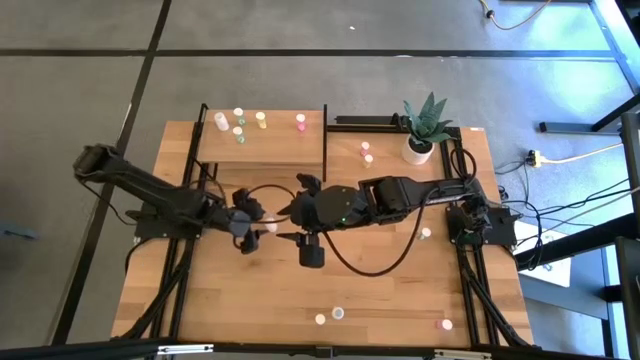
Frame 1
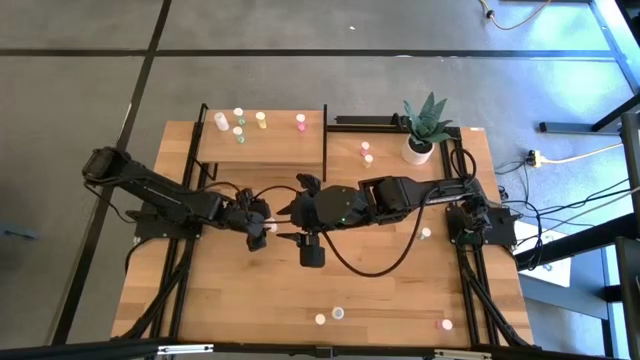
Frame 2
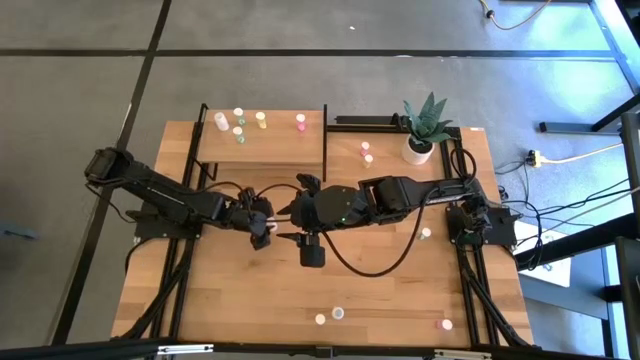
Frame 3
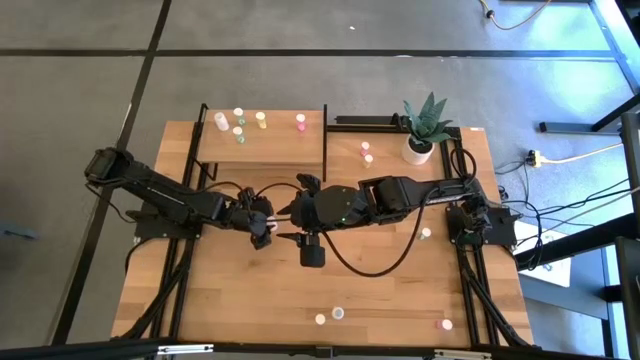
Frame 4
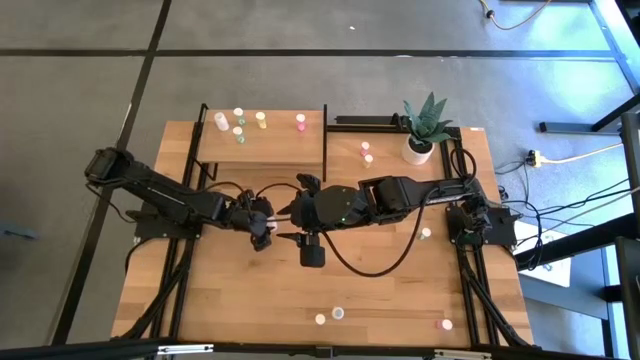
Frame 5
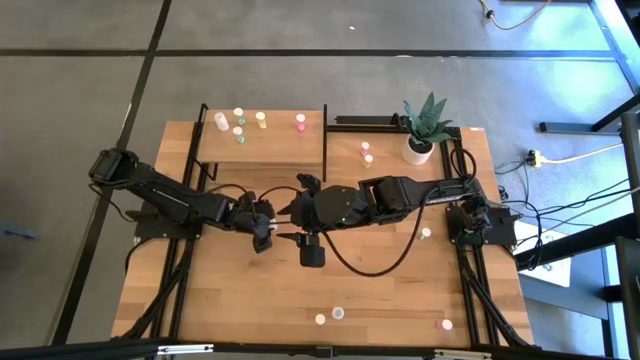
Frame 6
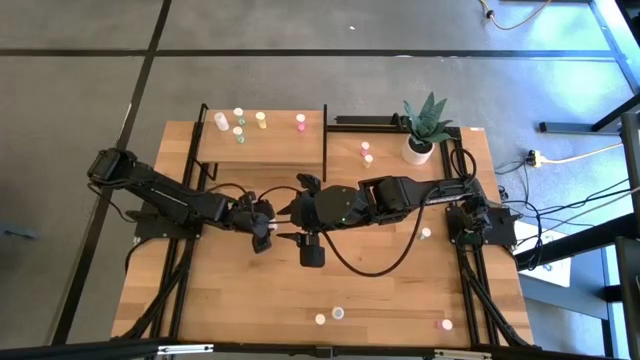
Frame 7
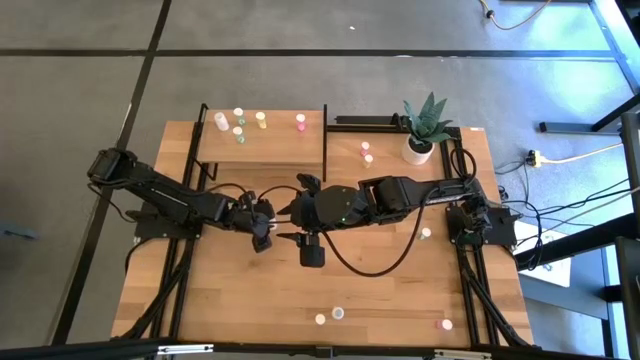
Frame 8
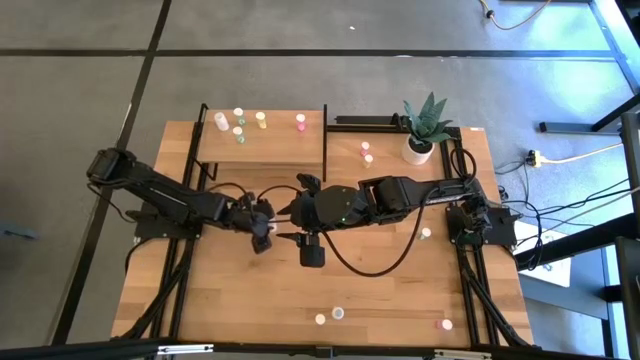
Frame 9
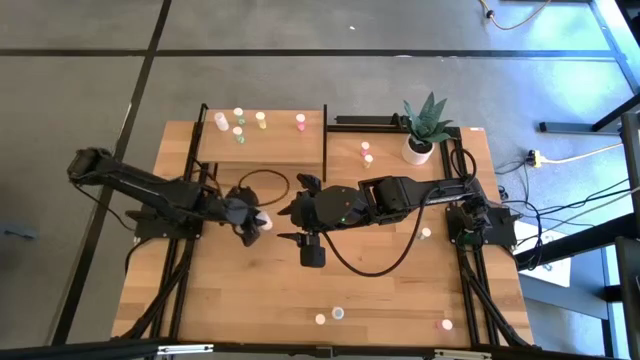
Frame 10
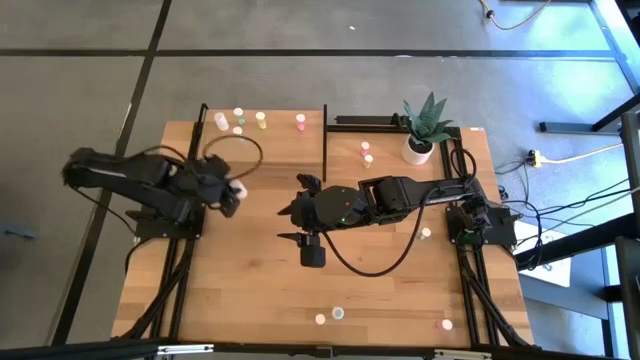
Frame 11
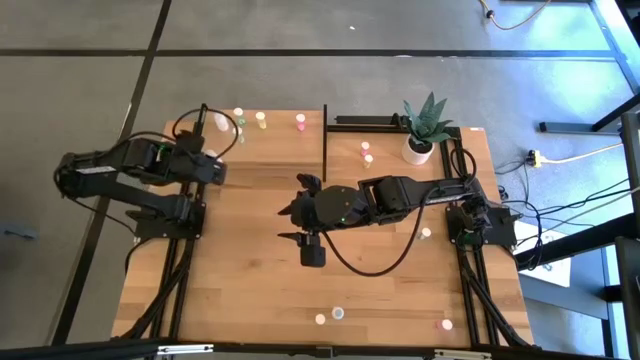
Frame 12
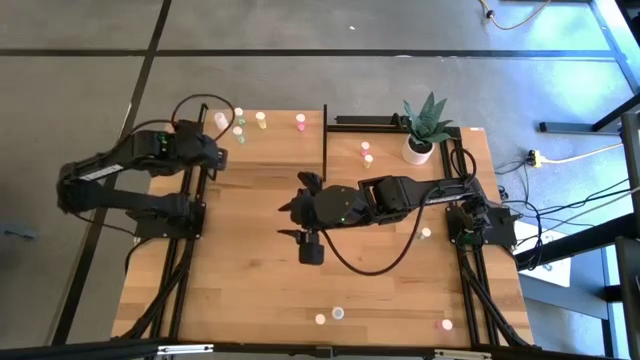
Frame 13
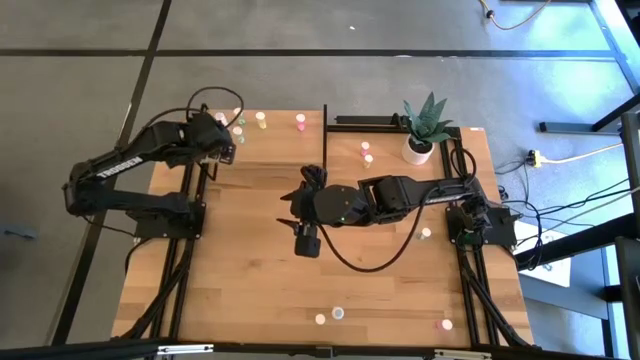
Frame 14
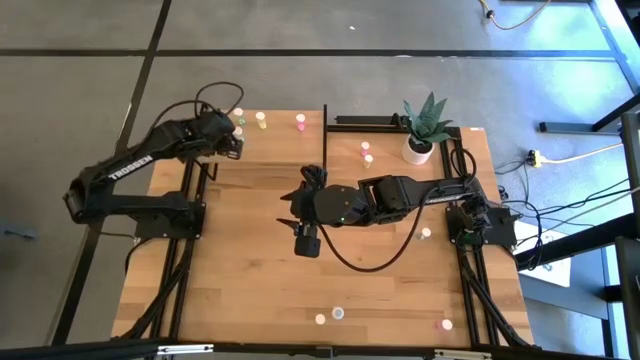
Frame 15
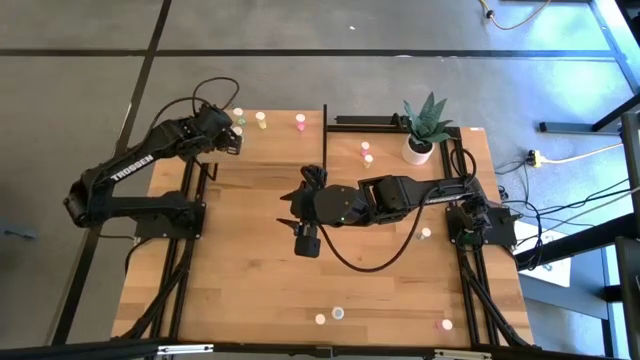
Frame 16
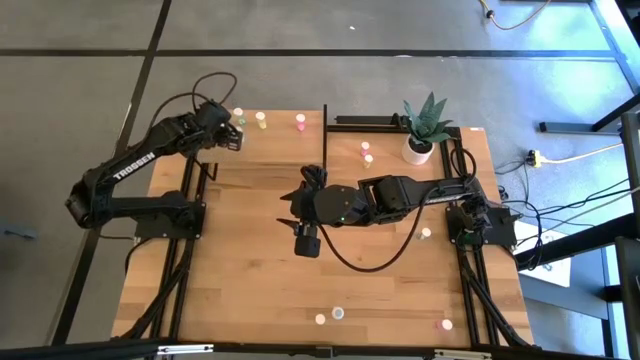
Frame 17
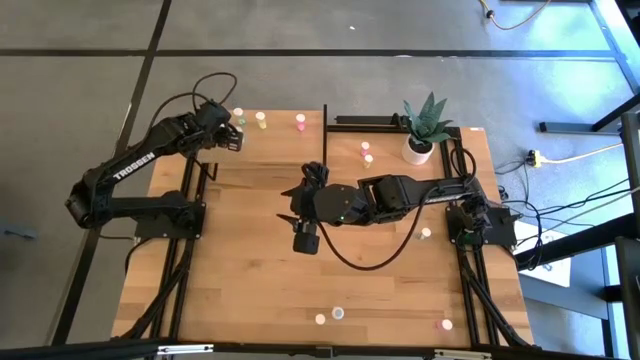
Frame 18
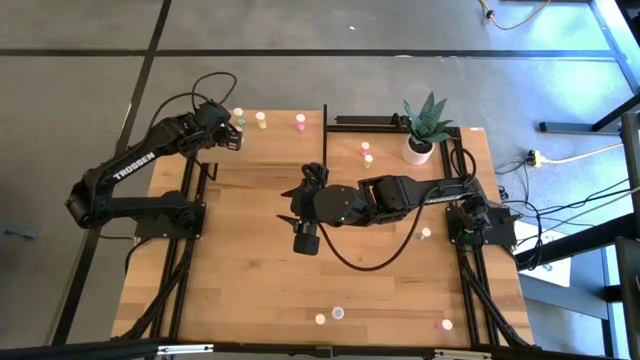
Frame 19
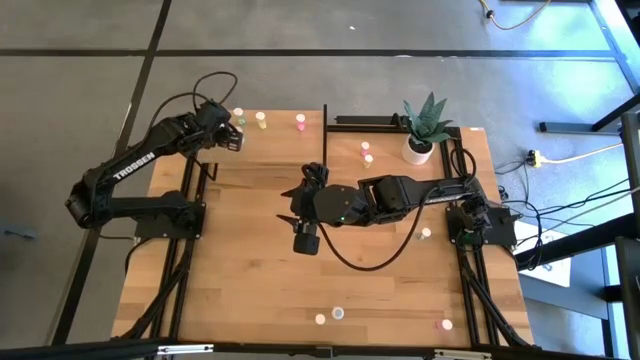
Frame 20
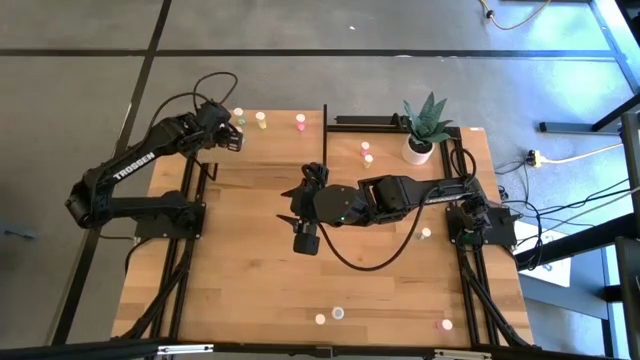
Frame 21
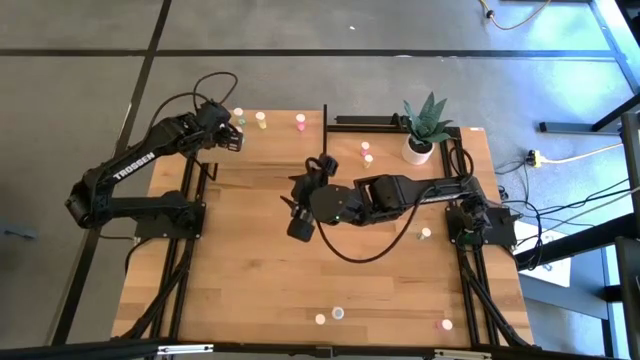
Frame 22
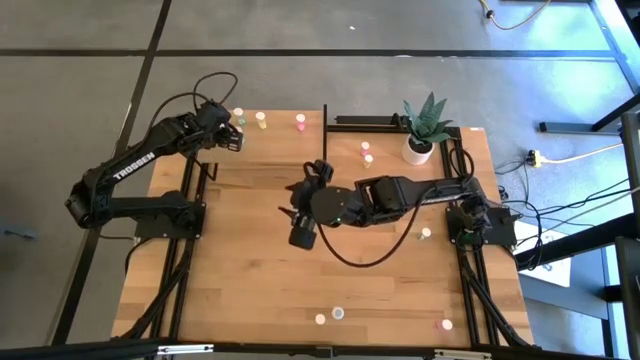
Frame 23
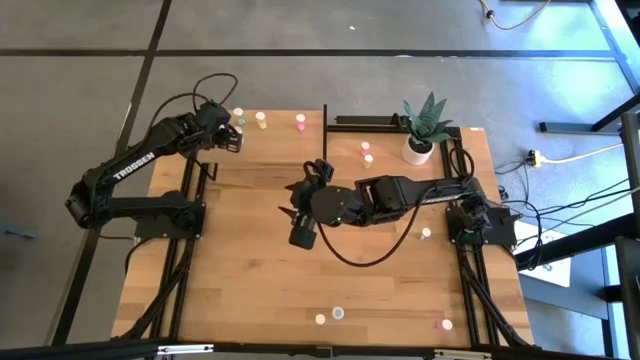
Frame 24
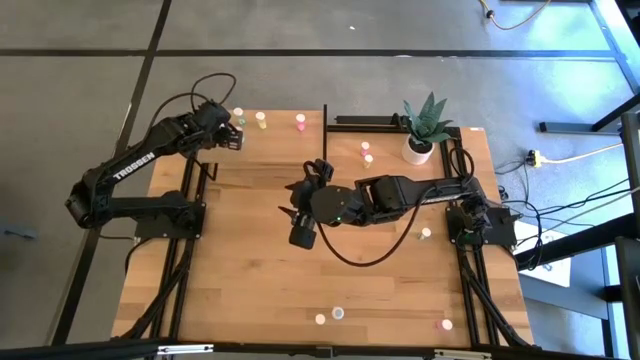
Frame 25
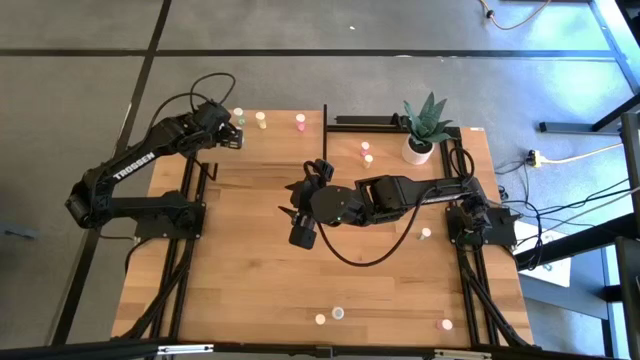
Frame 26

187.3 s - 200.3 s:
Task: Pick and place medicine bottles onto shelf by color
Put the top white pill bottle aligned with the other white pill bottle on the shelf

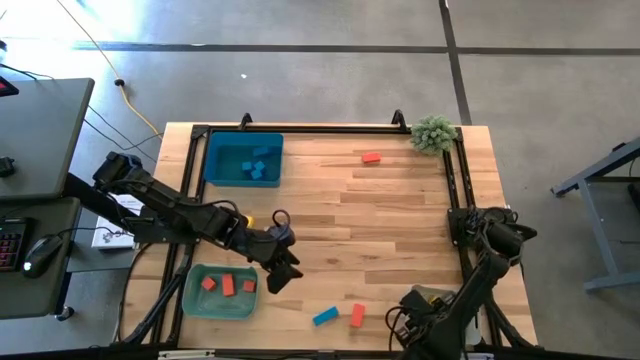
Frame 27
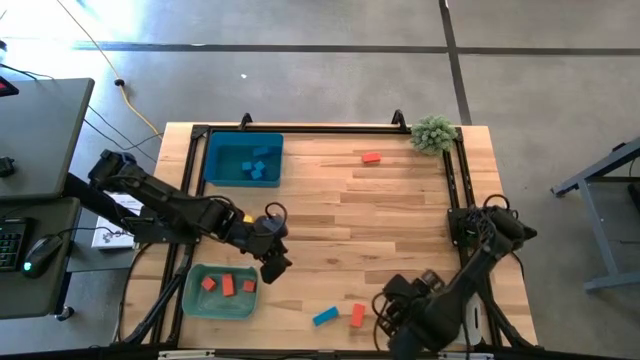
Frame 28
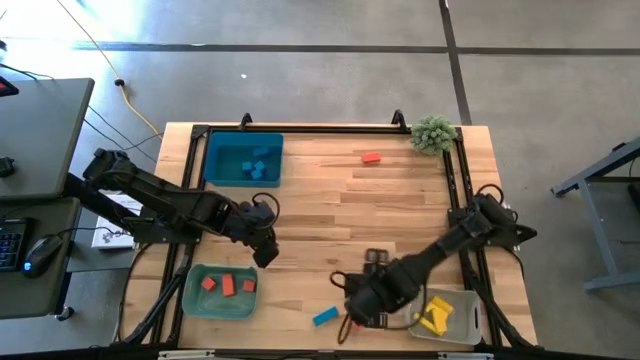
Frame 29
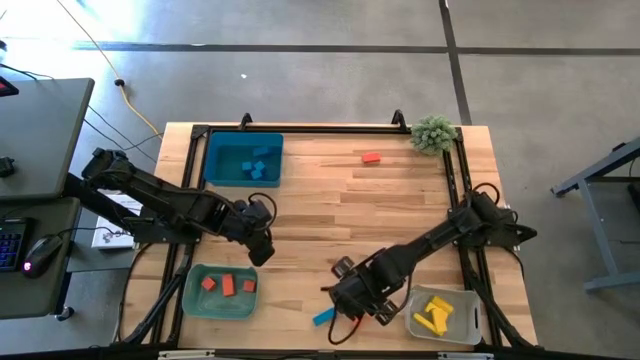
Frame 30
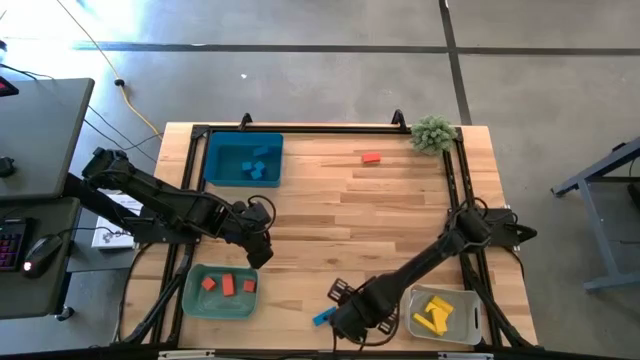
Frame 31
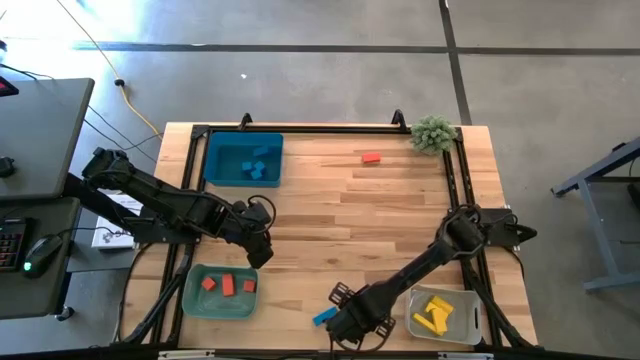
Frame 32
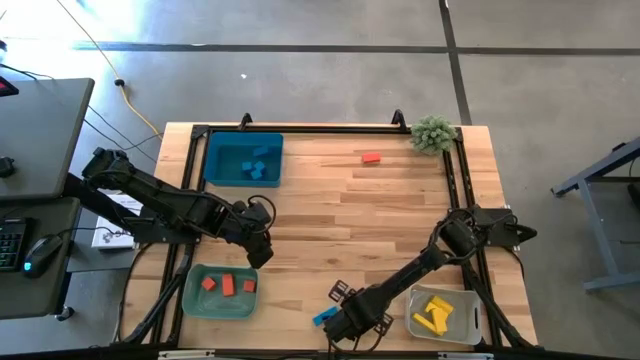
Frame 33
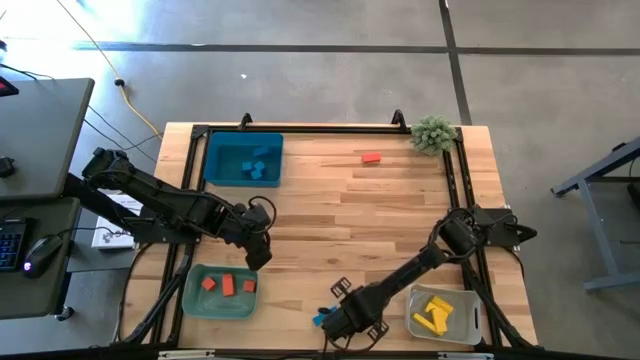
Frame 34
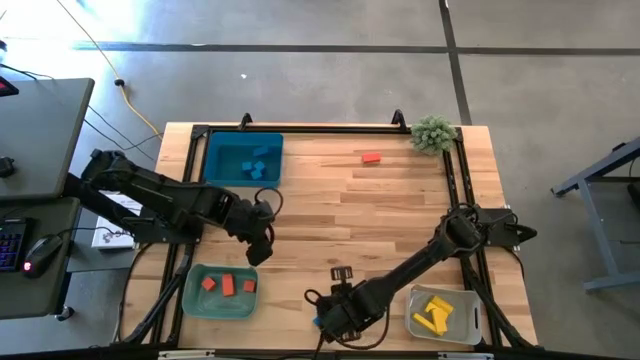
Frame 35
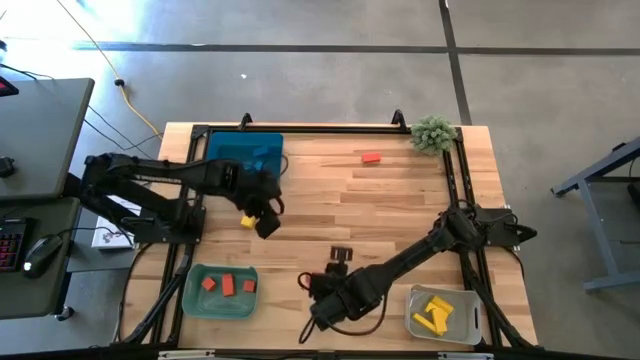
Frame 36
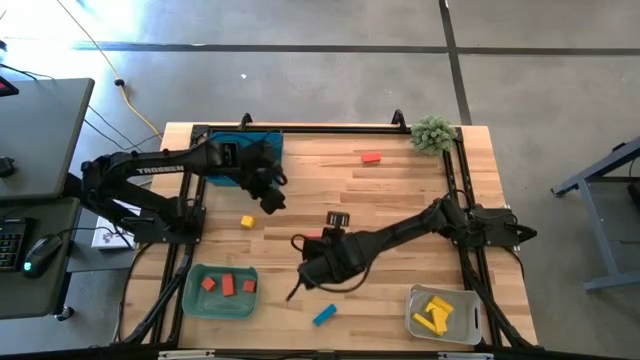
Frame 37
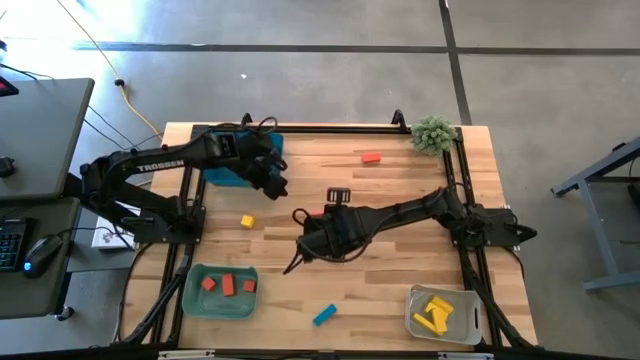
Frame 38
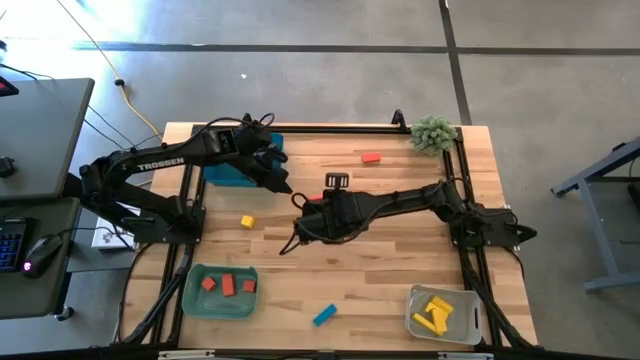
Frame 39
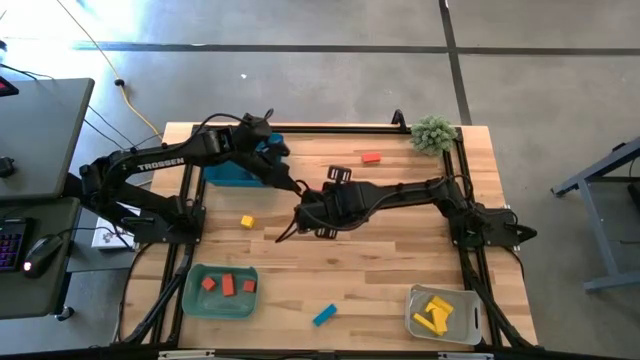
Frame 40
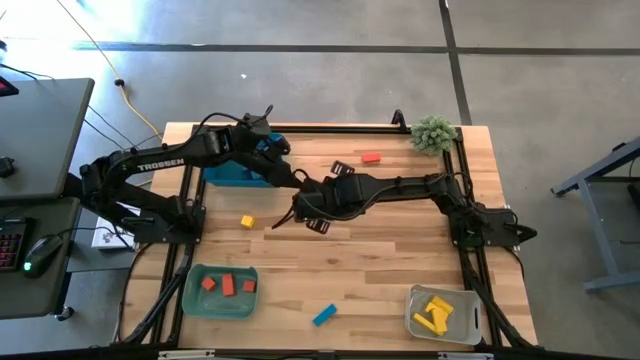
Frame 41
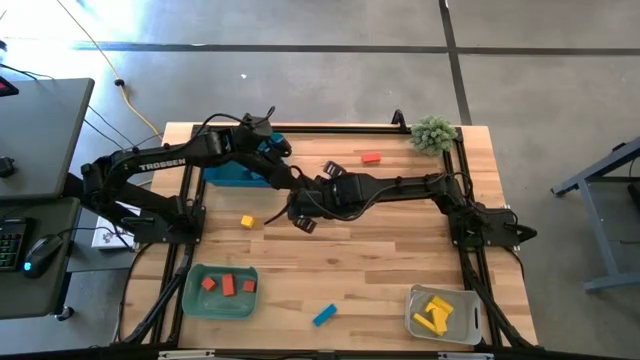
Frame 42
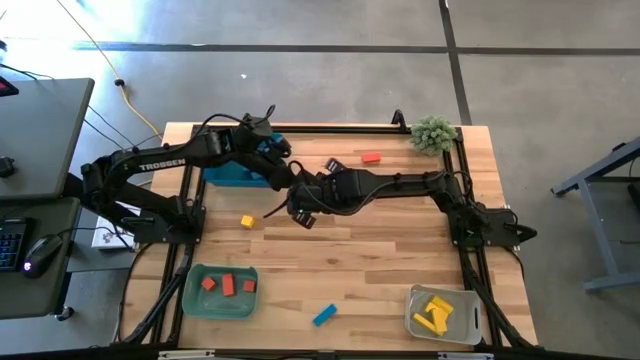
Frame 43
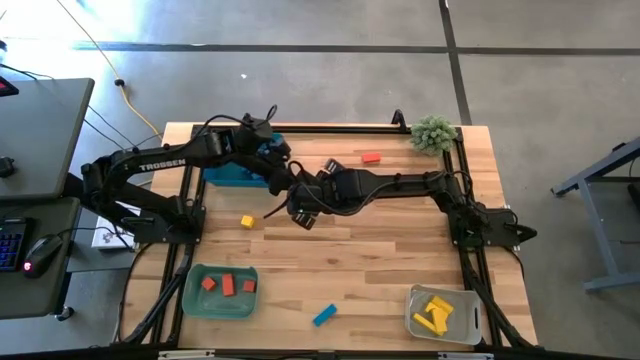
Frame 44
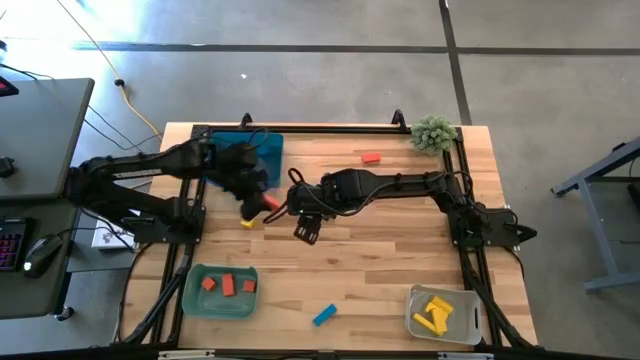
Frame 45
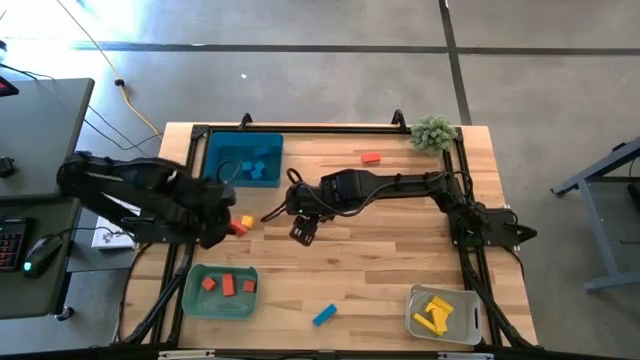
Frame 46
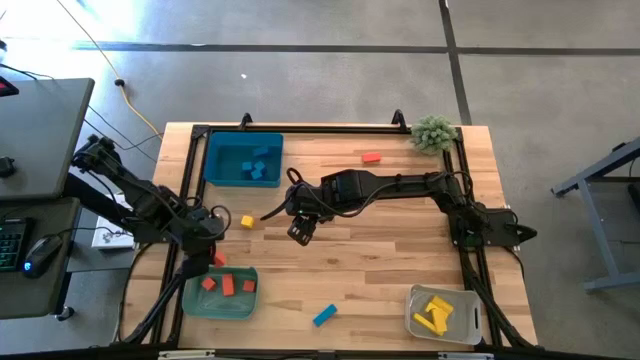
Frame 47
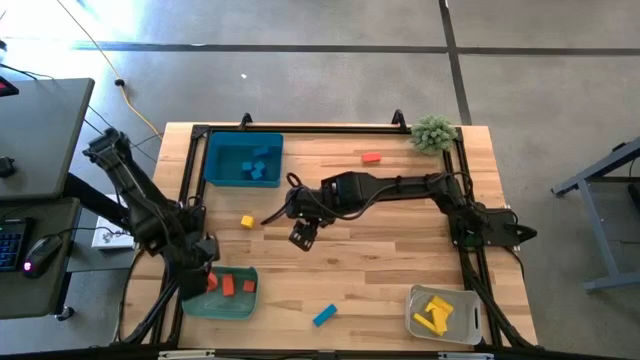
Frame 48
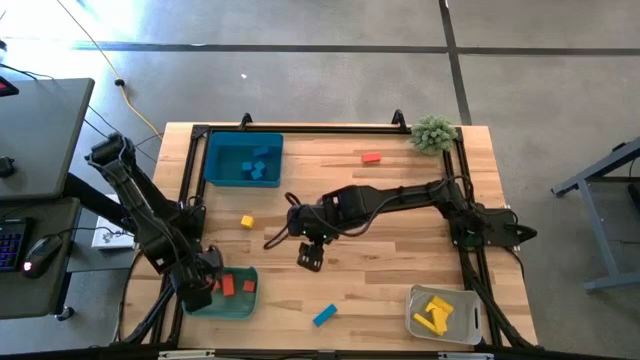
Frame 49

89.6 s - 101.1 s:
Task: Sort & place blocks by color
Put the orange block into the green bin
